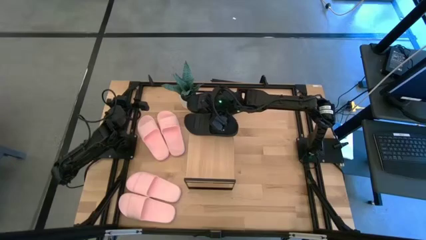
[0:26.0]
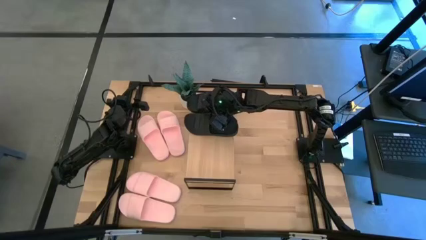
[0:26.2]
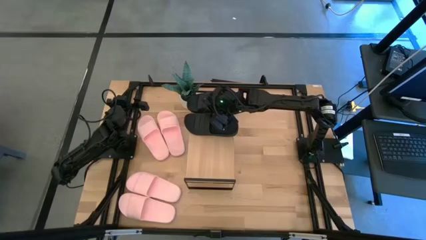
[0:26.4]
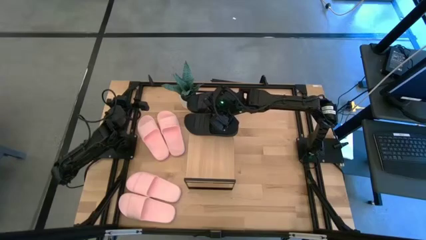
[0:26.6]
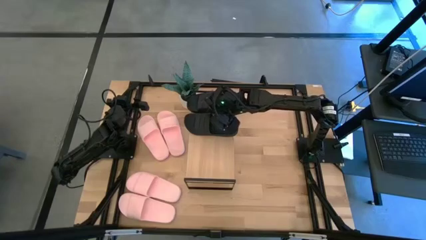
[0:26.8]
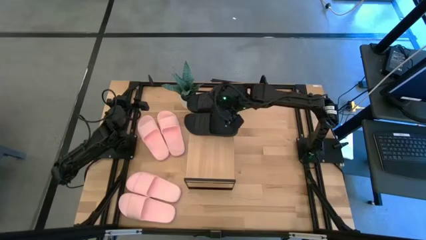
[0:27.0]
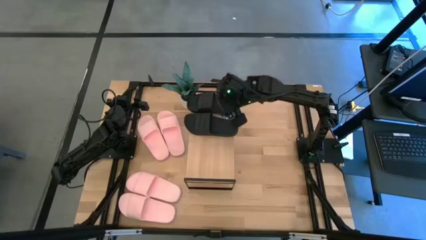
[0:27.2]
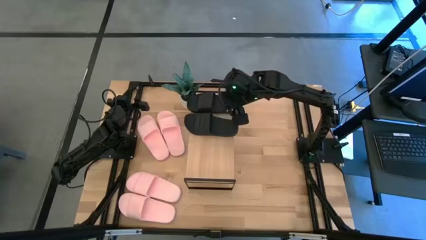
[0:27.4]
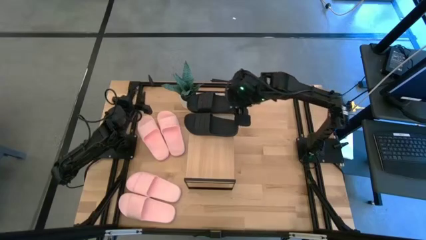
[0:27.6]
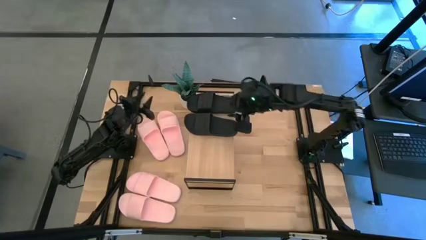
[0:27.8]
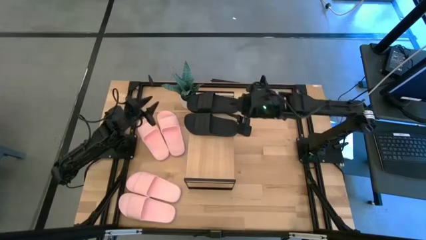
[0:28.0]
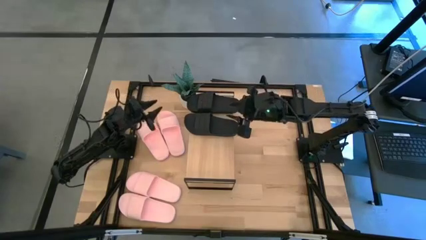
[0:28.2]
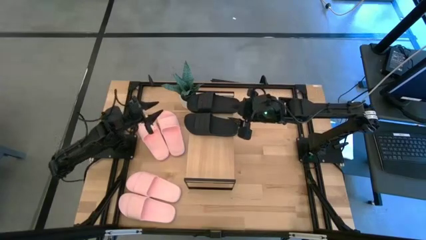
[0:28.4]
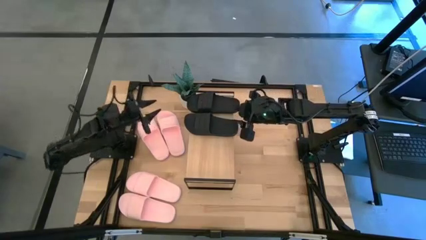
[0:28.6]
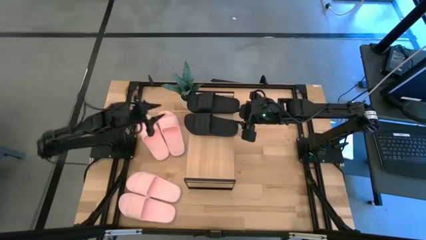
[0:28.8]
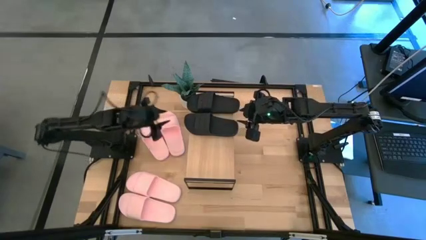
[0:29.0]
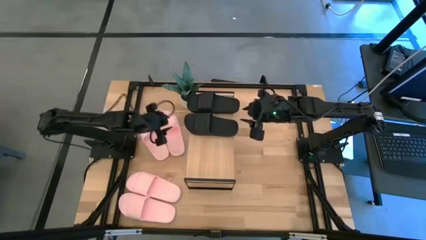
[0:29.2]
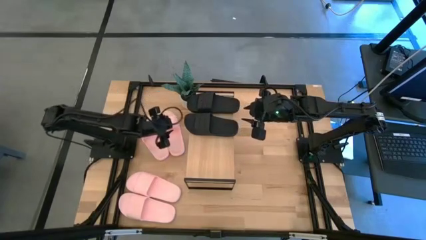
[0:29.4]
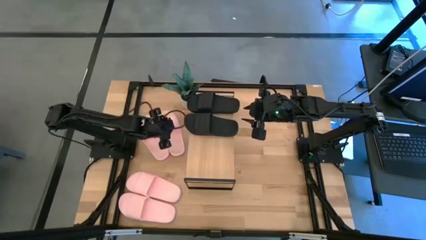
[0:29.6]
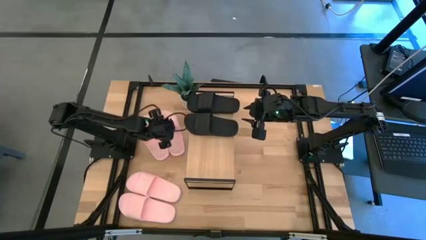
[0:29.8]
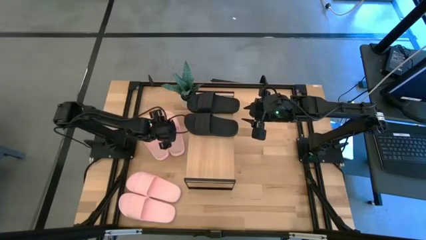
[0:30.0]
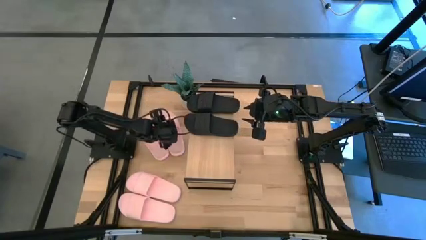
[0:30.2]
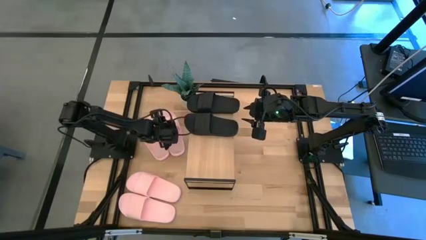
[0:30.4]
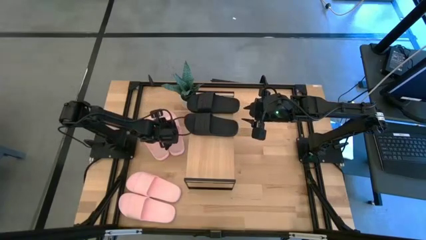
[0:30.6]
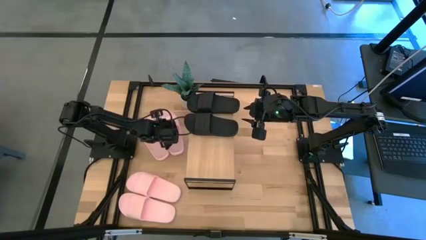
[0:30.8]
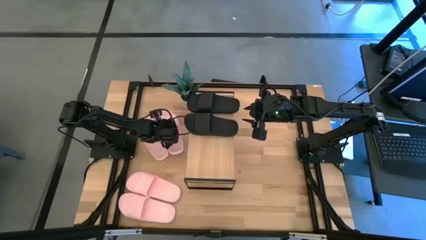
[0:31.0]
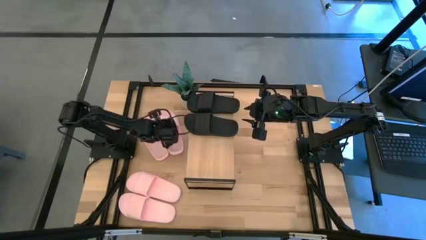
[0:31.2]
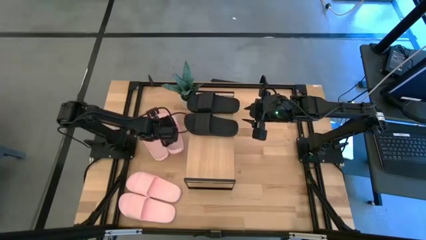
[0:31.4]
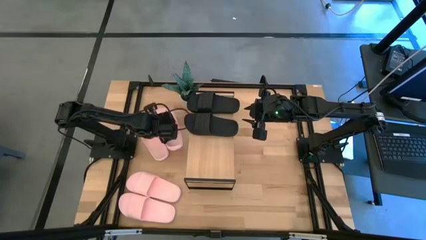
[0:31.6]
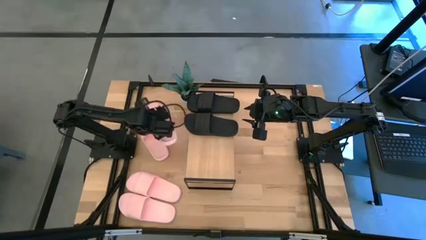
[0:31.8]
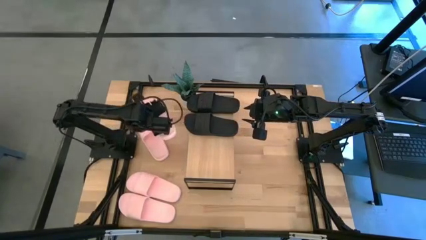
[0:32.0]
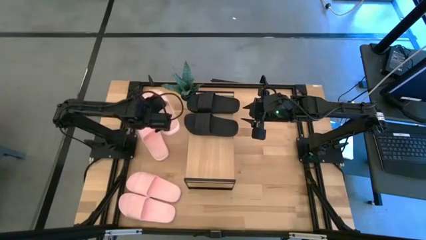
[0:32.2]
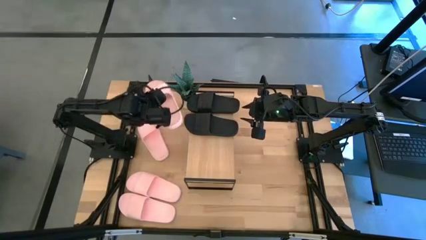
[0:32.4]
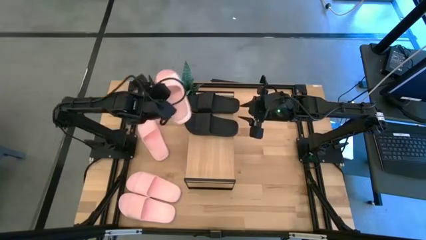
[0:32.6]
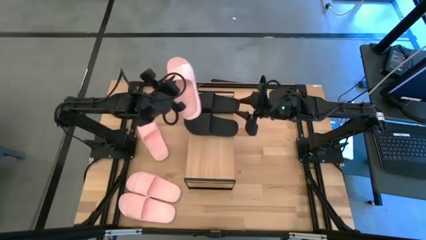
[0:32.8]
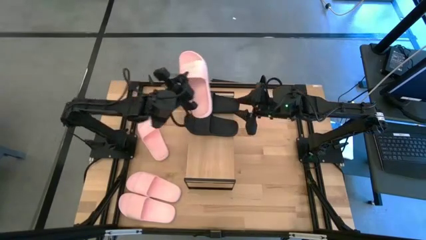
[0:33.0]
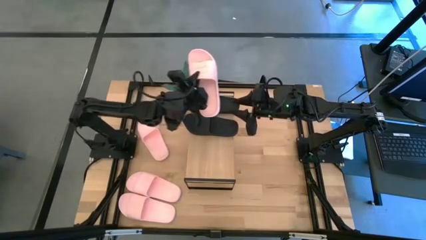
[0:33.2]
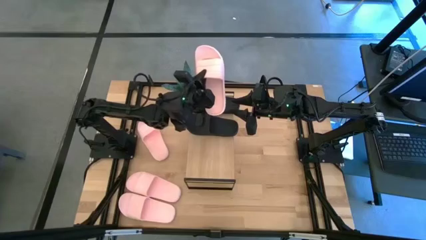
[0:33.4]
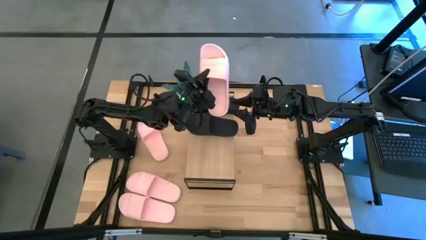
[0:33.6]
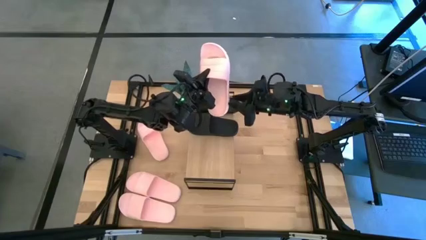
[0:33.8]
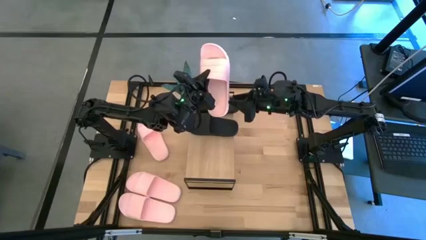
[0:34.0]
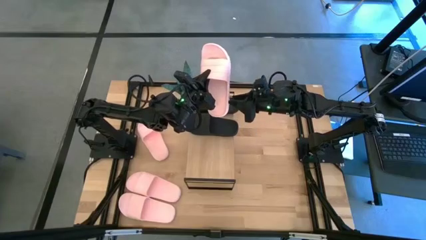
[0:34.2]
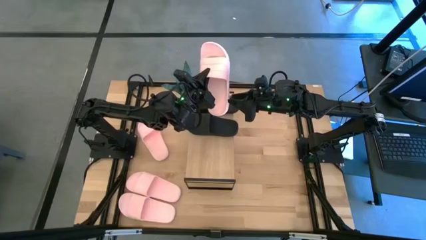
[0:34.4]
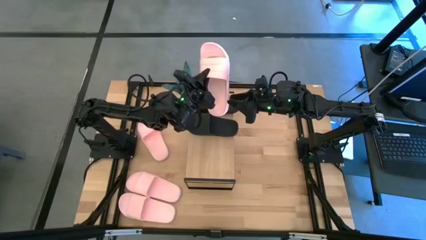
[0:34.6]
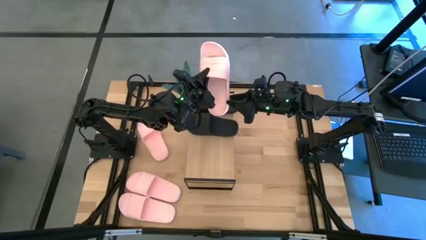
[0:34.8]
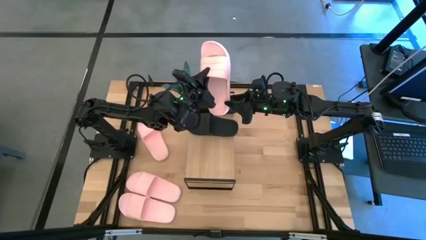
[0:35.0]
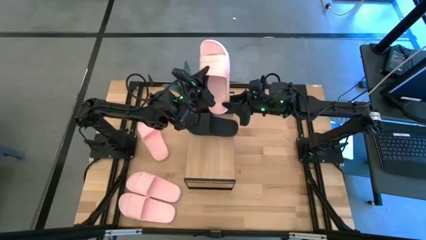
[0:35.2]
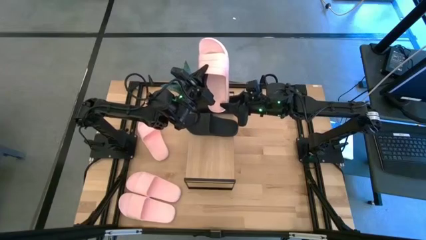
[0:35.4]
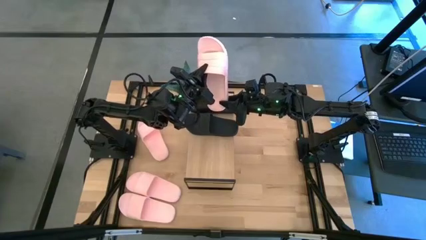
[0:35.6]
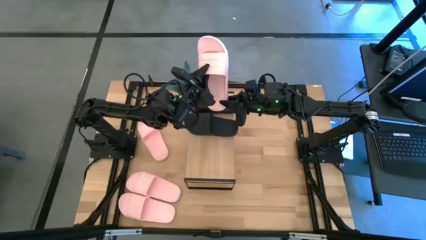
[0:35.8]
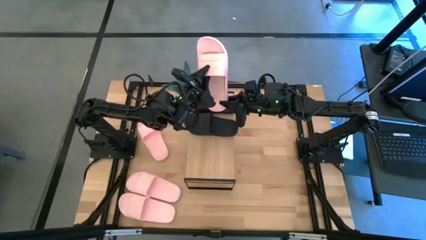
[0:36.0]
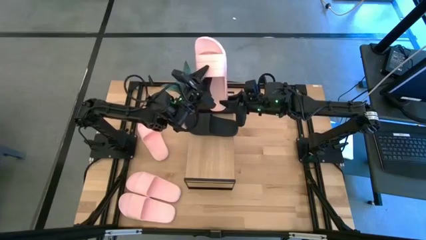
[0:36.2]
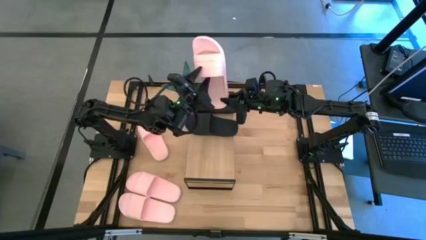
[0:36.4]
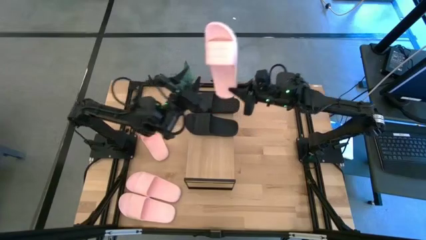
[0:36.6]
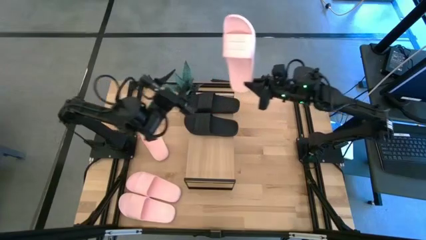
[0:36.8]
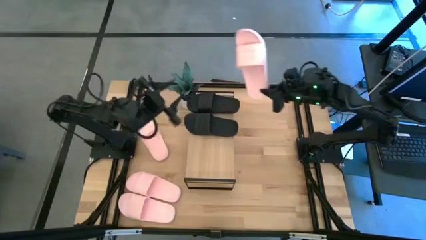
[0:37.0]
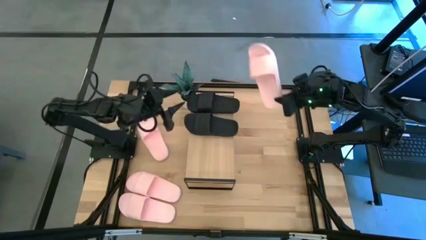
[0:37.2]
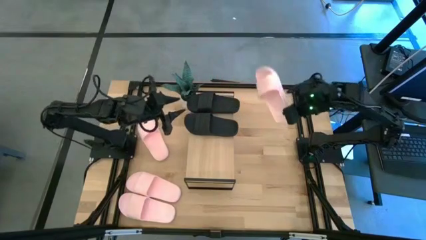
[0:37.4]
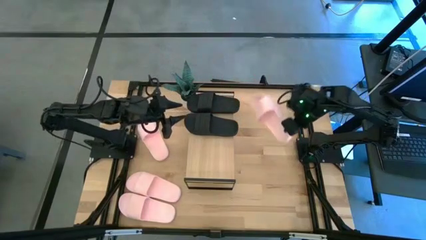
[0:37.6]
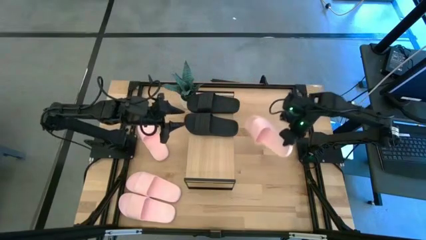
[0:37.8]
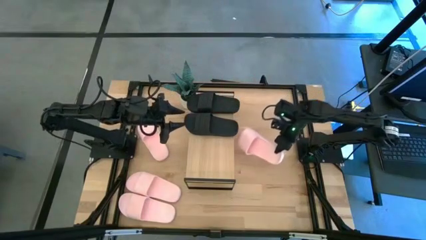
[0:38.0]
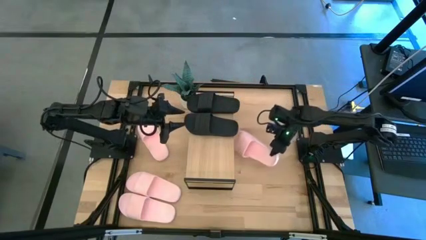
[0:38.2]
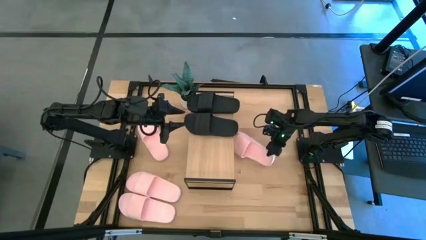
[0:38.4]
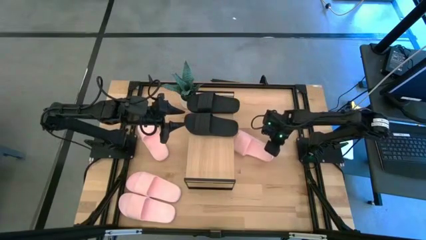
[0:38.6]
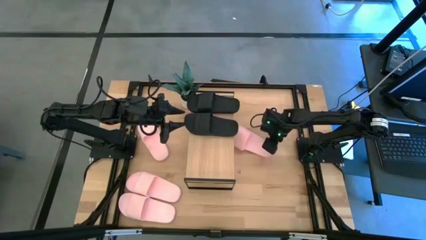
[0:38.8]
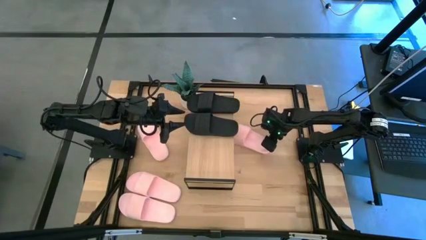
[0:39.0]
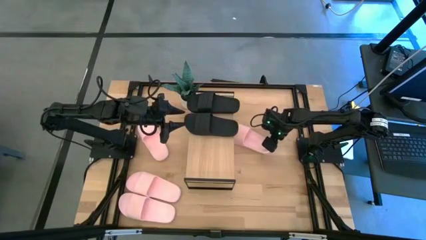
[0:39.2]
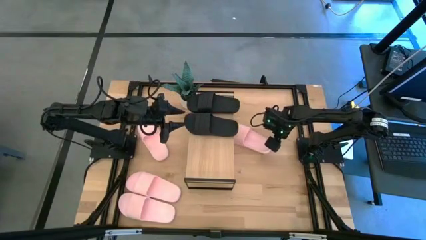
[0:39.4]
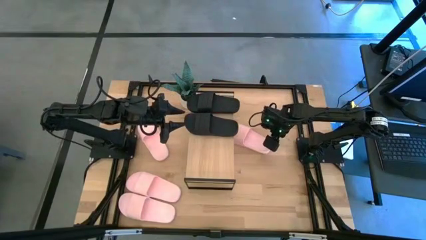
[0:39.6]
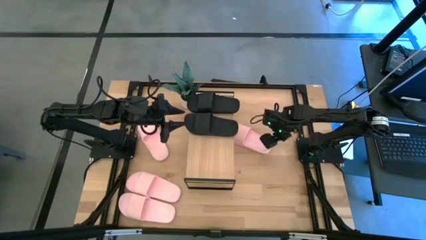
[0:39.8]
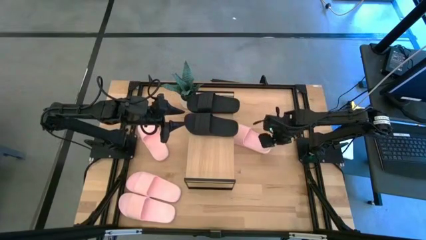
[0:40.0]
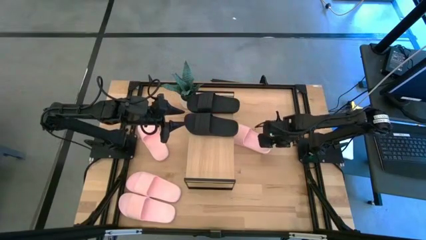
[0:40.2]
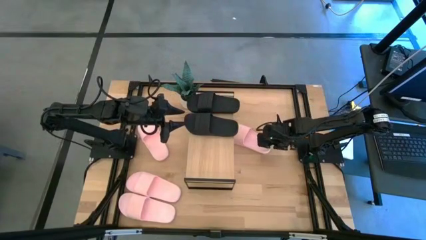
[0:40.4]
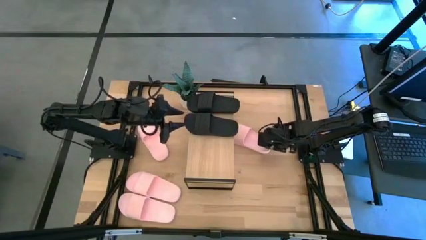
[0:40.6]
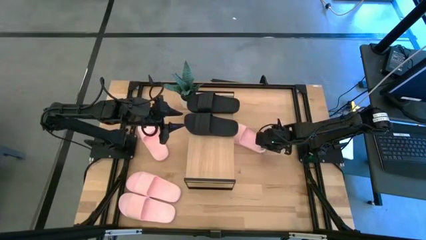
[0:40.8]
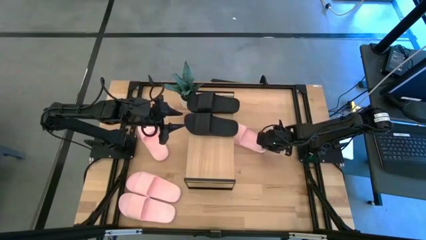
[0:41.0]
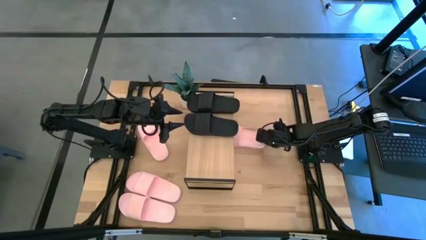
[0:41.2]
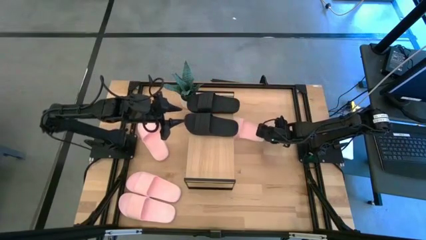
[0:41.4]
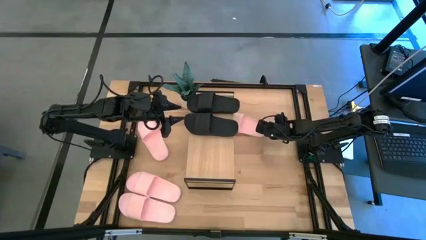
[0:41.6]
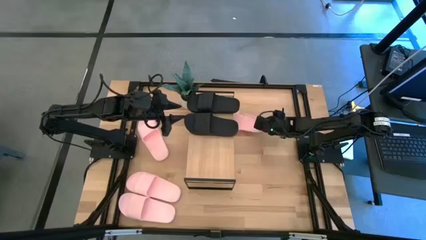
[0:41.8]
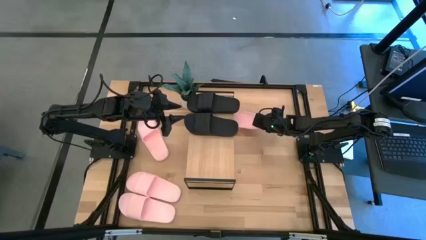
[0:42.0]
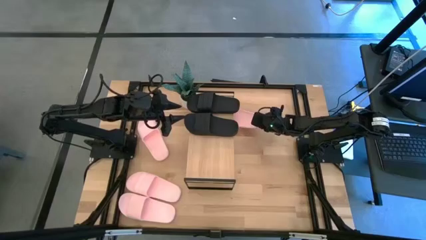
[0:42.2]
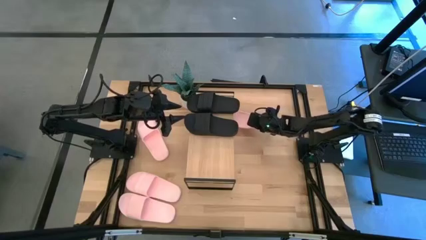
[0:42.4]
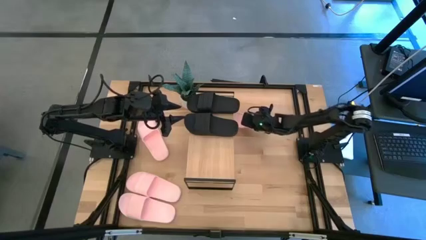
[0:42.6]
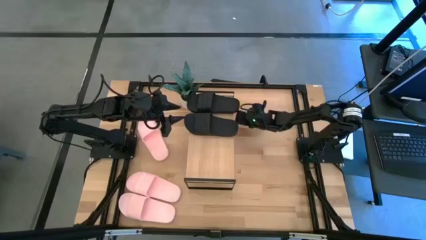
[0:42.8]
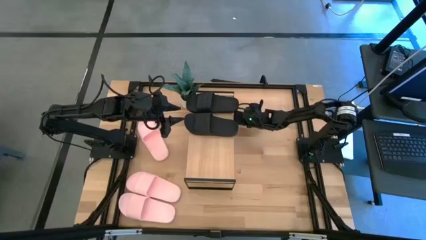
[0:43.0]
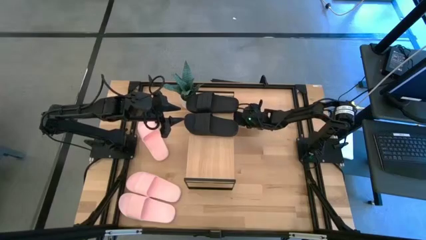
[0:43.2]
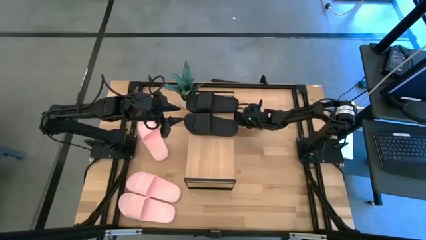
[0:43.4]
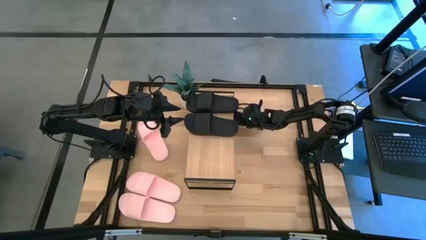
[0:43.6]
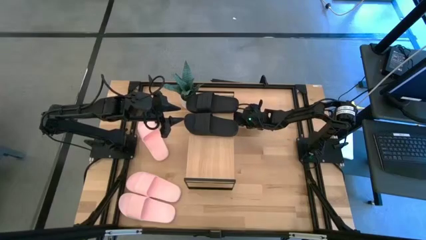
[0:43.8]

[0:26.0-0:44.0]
Task: Pick and place slides into the shelf
Put the pink slide under the shelf
